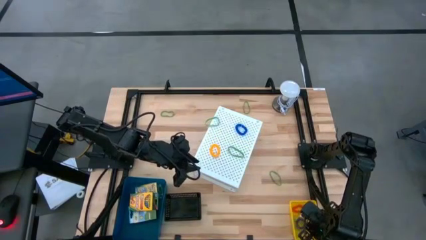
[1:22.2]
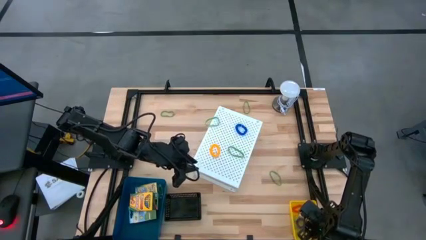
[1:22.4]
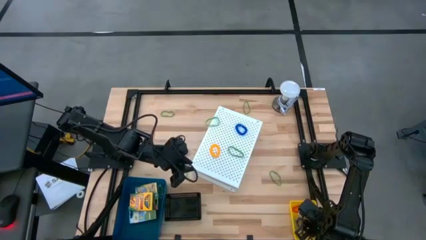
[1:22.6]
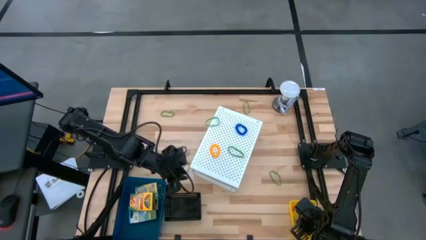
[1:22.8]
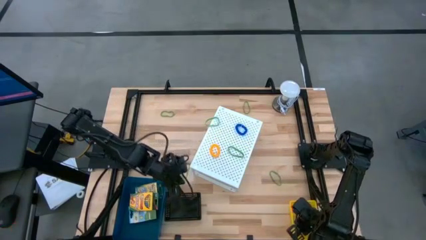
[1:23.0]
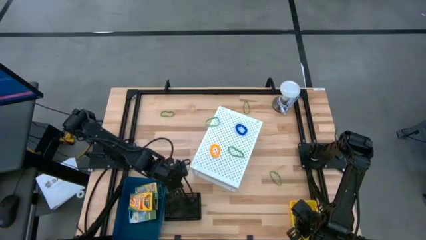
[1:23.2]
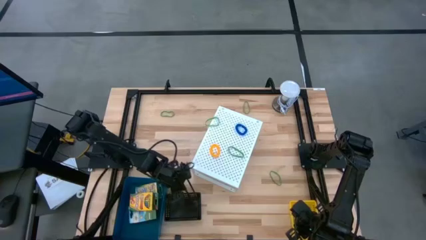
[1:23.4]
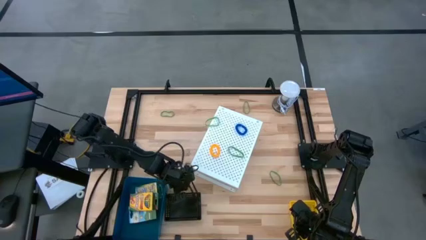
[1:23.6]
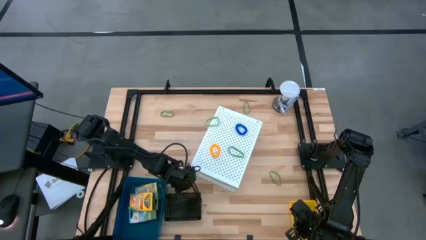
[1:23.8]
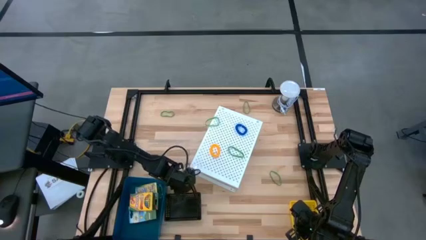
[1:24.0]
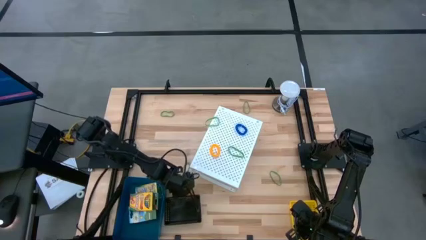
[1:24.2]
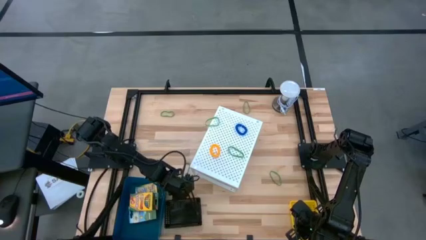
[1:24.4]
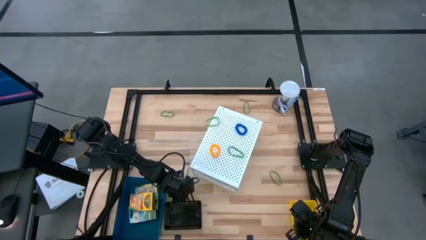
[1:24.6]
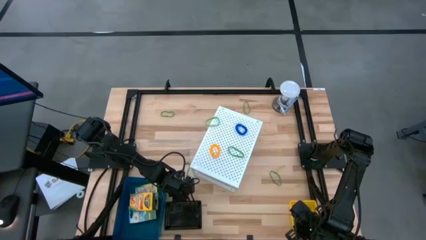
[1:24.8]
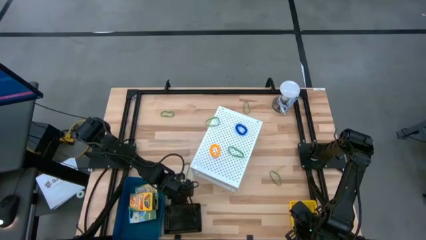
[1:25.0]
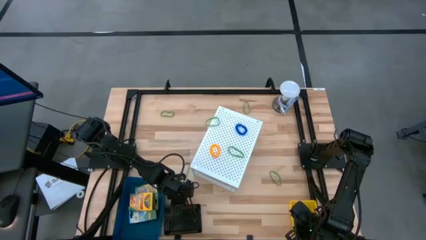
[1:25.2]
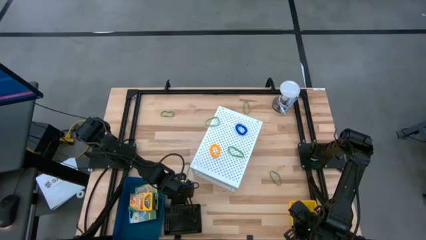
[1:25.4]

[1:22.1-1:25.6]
Task: Pick & Place Office Desk Supplies
Adjust the black bin

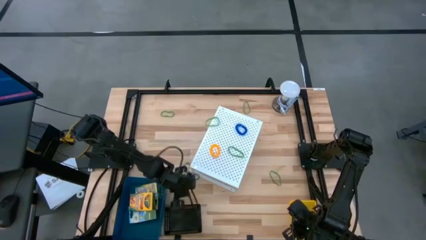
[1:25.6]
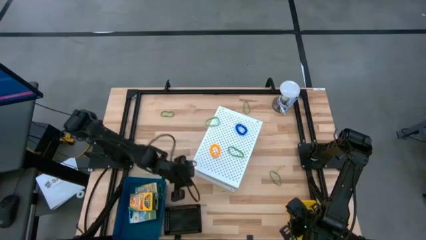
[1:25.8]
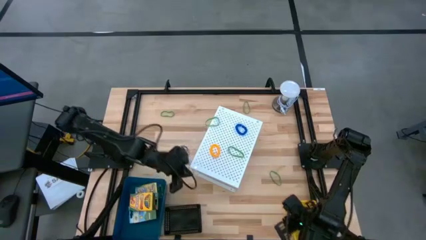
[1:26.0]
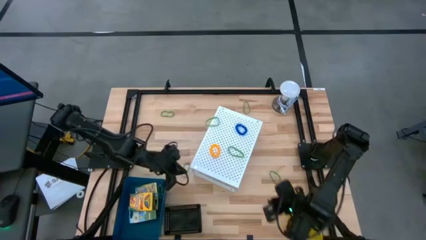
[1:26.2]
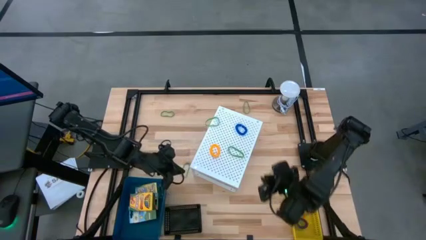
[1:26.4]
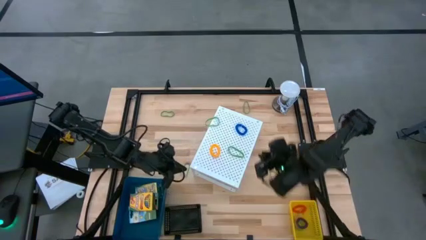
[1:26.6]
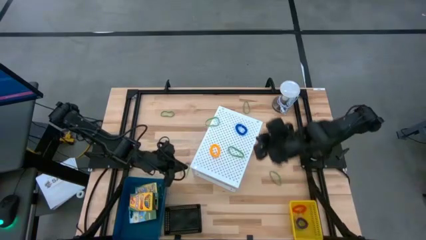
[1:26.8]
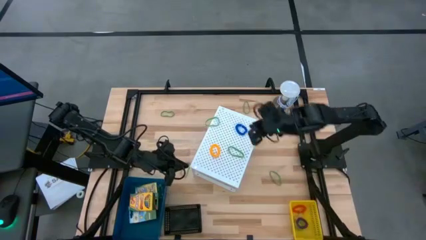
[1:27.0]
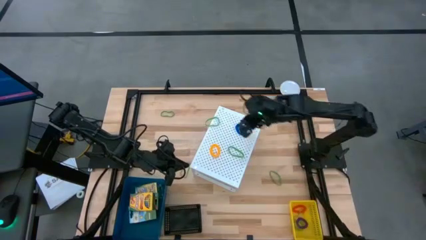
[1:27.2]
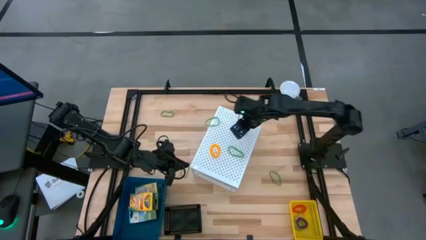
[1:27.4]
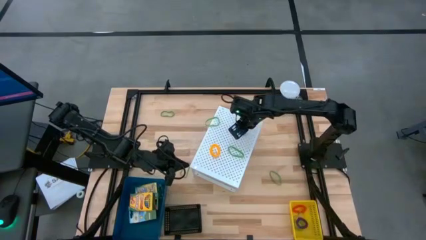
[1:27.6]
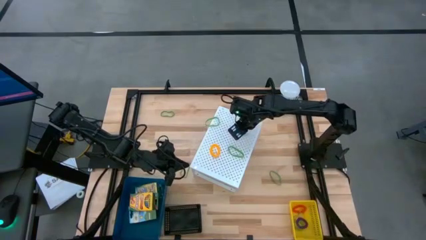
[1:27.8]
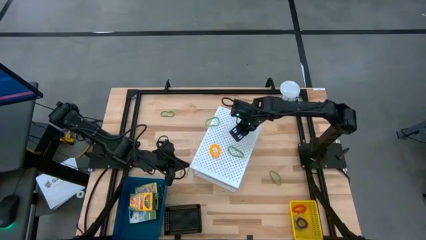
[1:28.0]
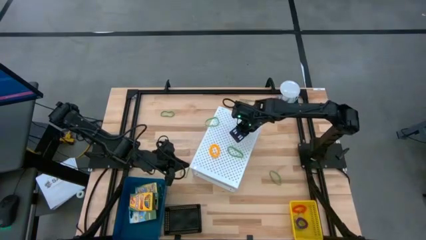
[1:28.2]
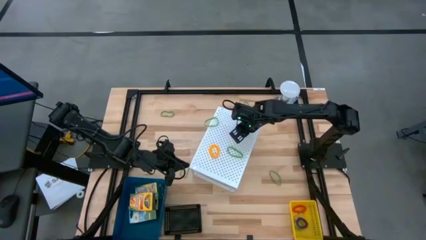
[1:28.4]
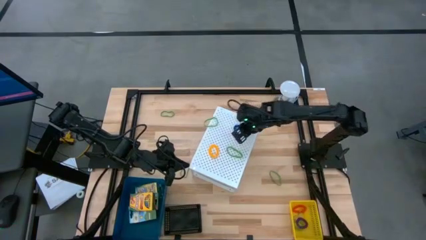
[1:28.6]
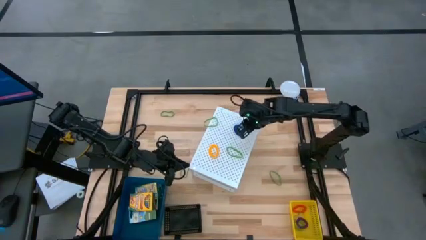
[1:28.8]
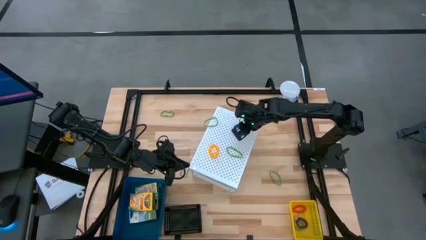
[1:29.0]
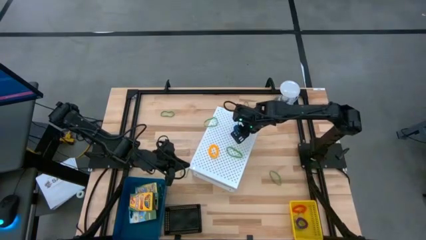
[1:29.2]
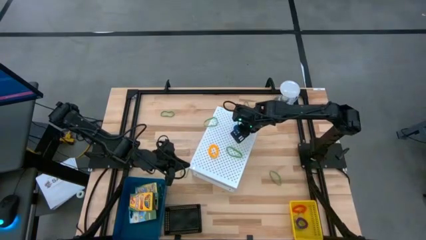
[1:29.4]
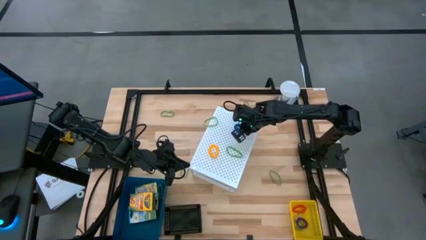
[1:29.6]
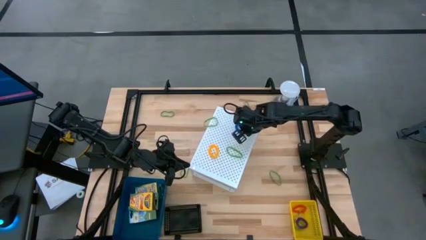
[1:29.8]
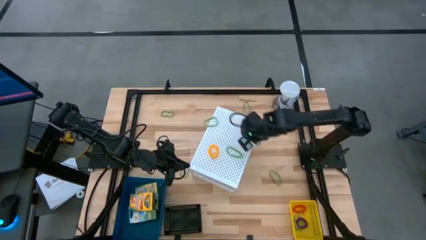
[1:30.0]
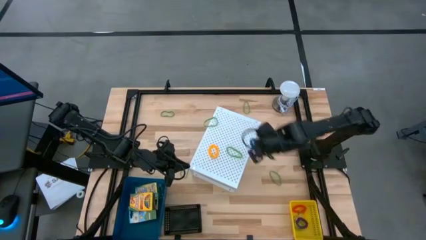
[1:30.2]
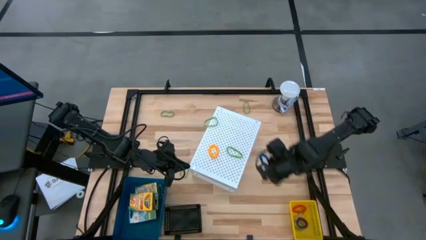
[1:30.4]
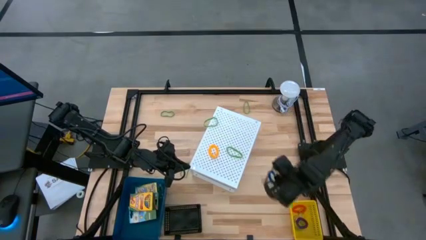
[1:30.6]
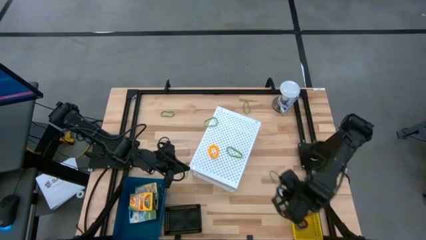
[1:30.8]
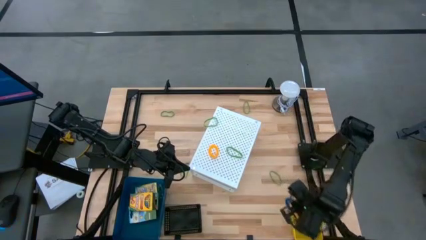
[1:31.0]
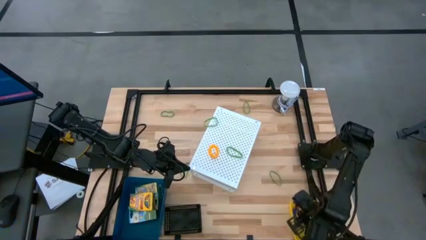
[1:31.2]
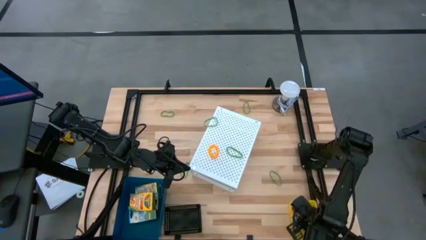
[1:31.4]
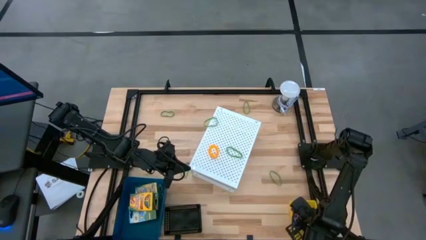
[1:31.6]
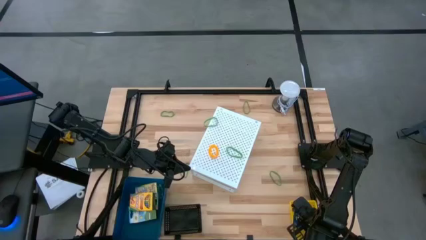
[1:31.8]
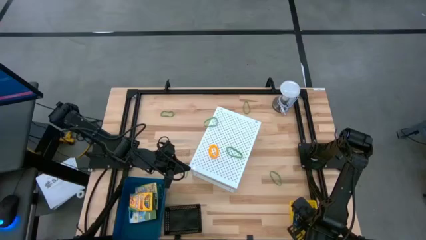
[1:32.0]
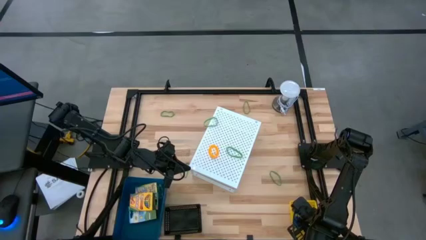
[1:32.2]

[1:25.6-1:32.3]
Put the blue spring keychain into the yellow bin
